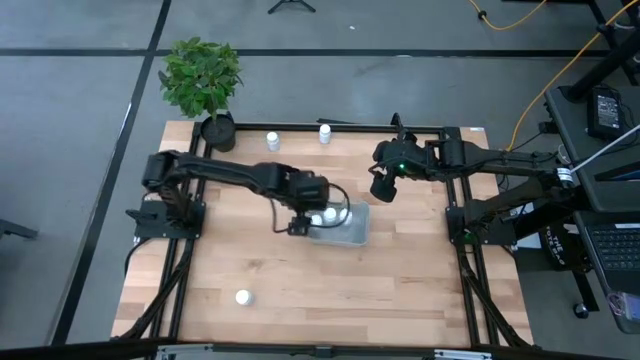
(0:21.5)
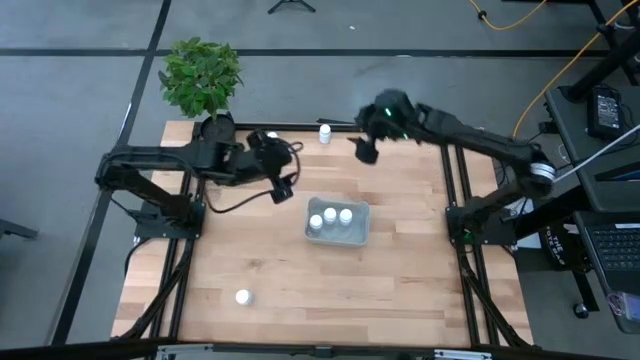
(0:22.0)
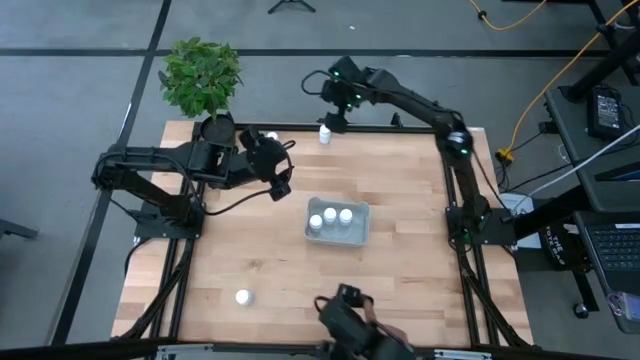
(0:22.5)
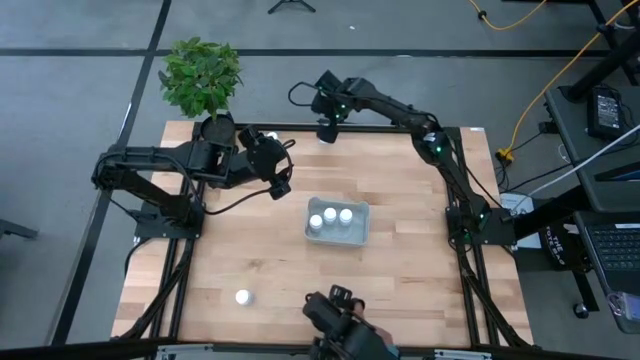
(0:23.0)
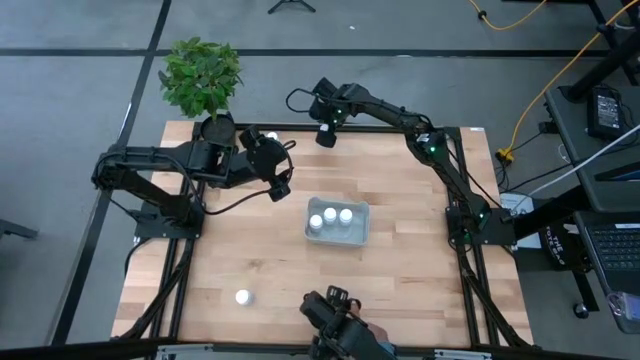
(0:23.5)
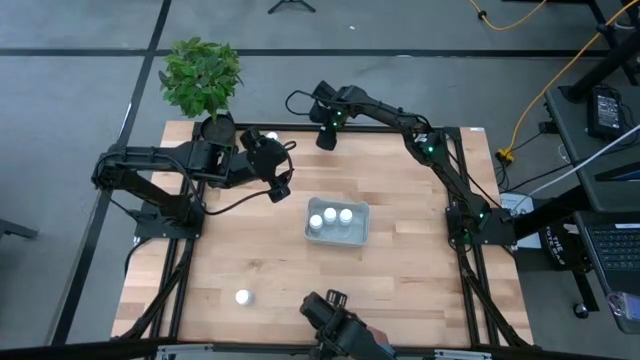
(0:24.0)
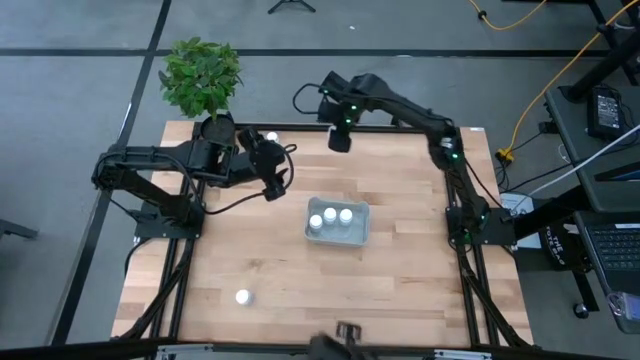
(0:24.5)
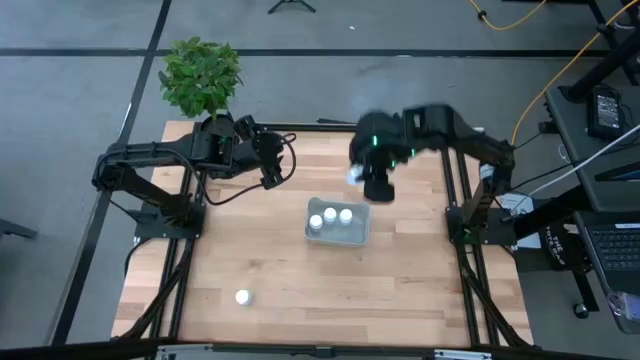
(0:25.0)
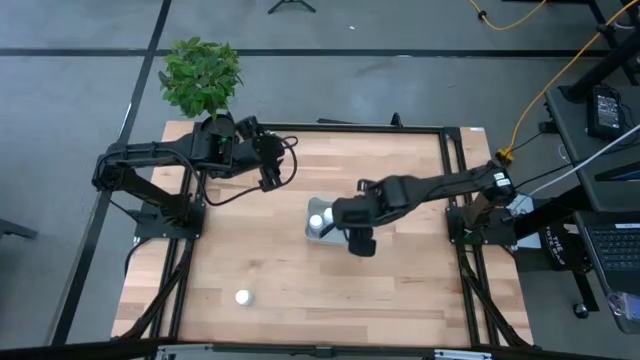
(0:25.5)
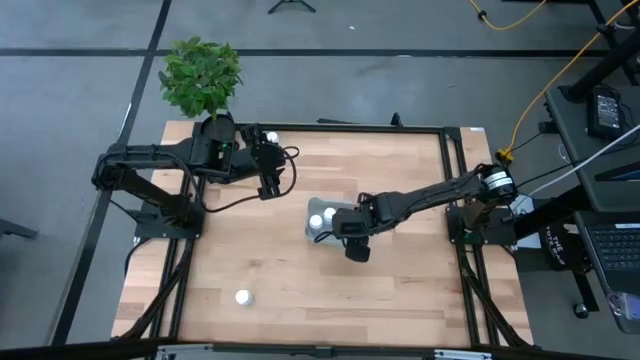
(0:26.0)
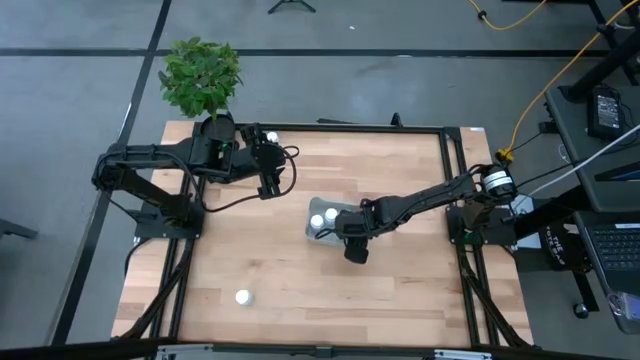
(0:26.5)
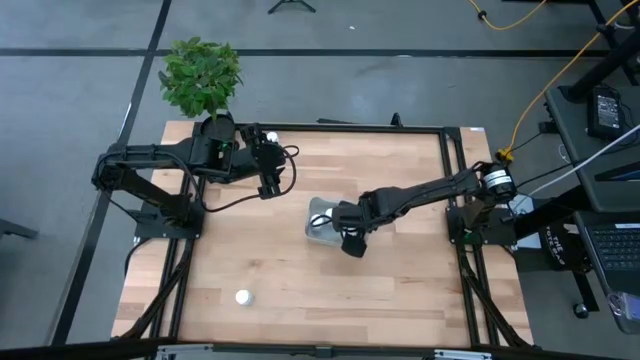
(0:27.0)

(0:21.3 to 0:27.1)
Task: Pick and place pill bottles into a basket
Put the top right white pill bottle into the gray bin

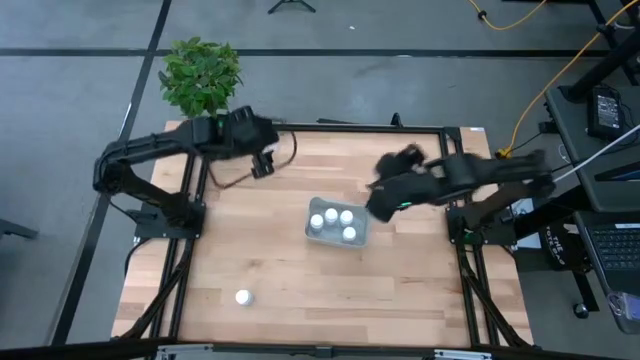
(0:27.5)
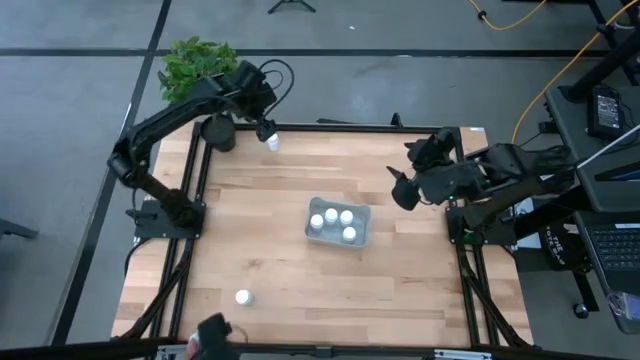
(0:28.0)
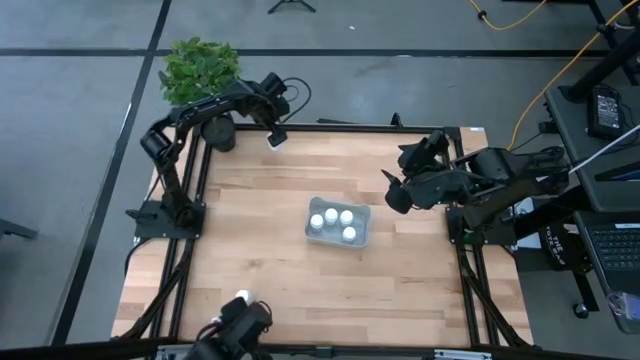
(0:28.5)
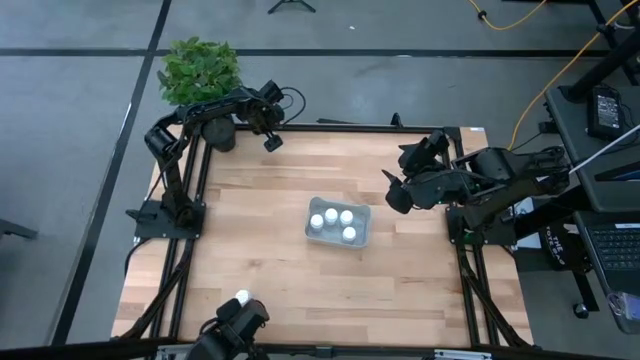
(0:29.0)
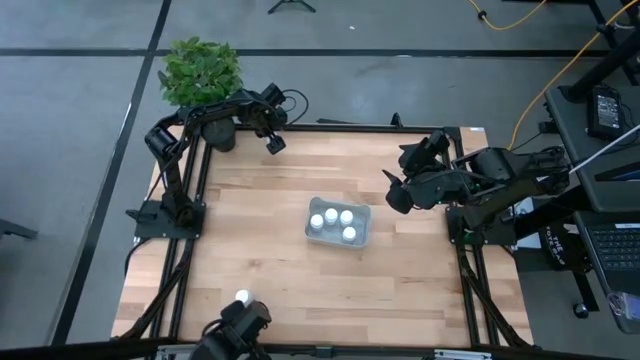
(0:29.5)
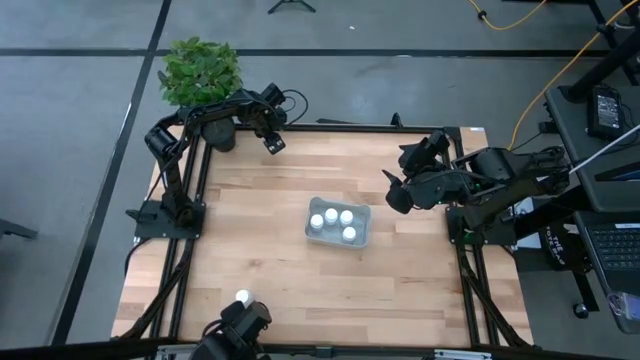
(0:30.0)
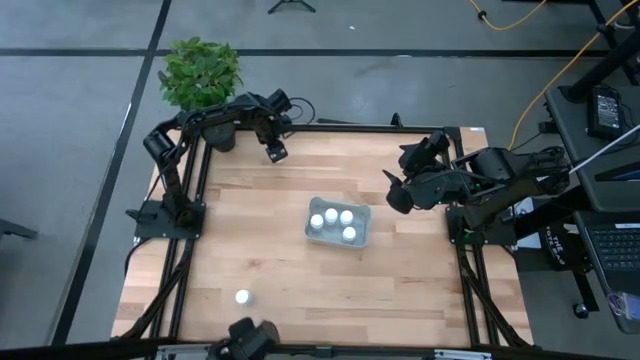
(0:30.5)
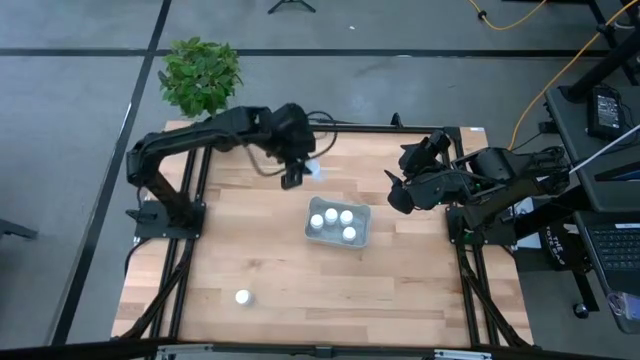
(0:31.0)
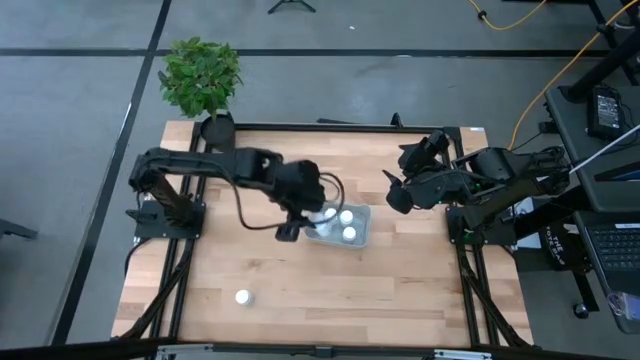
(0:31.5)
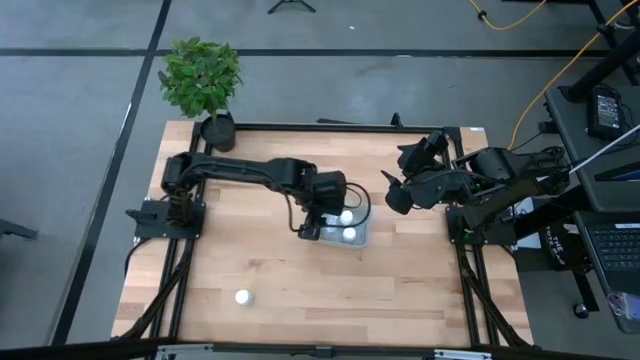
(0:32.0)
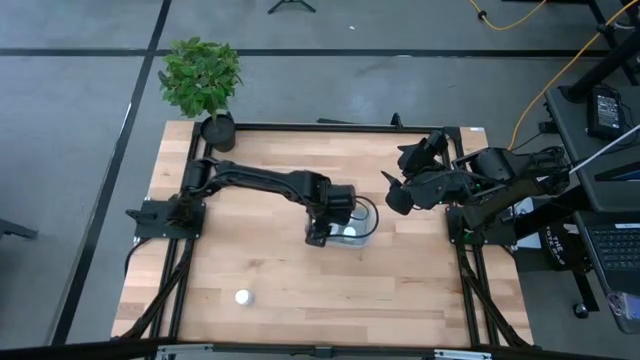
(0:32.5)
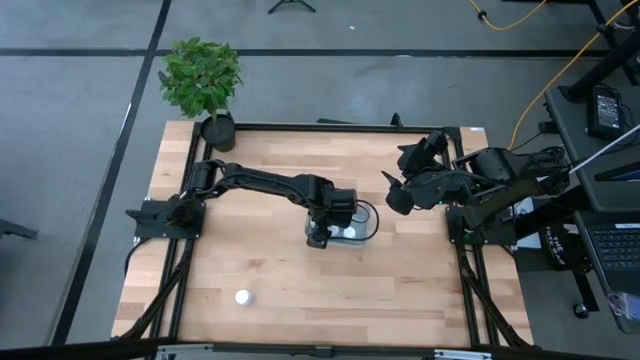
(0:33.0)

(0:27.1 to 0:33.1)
Put the top white pill bottle into the gray bin

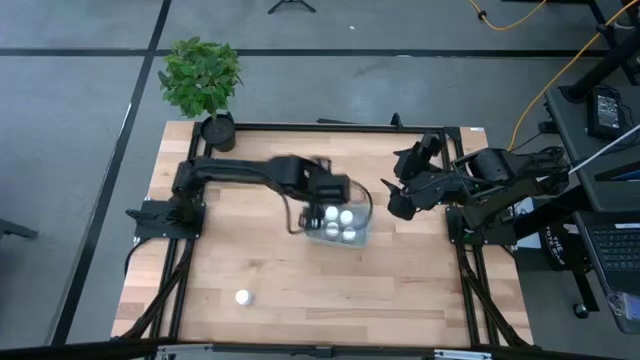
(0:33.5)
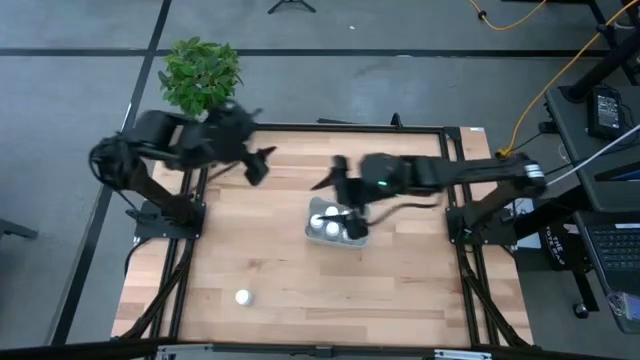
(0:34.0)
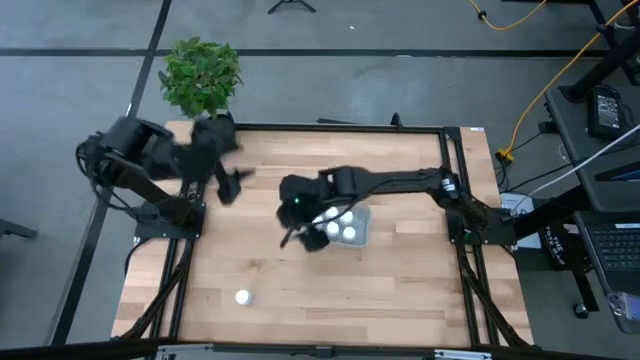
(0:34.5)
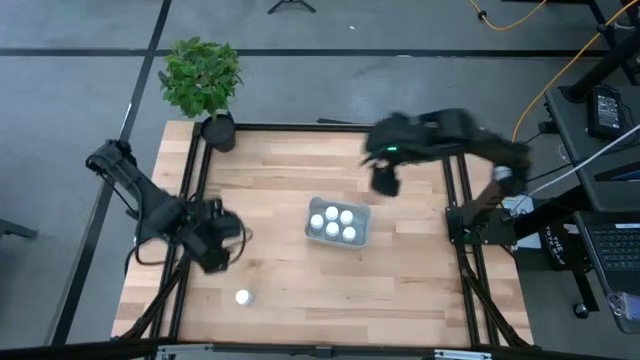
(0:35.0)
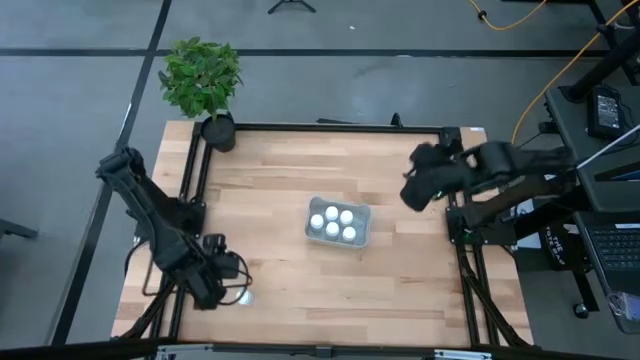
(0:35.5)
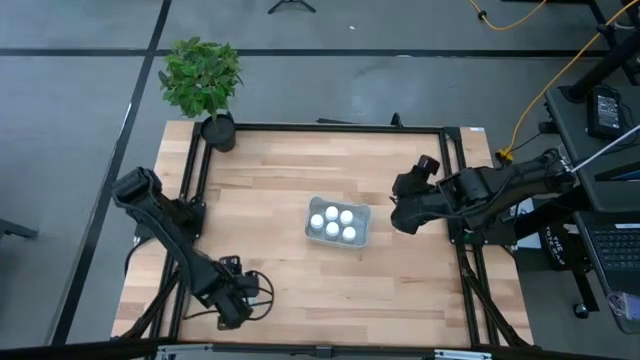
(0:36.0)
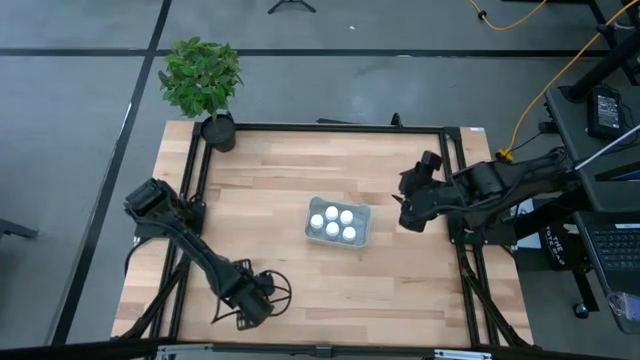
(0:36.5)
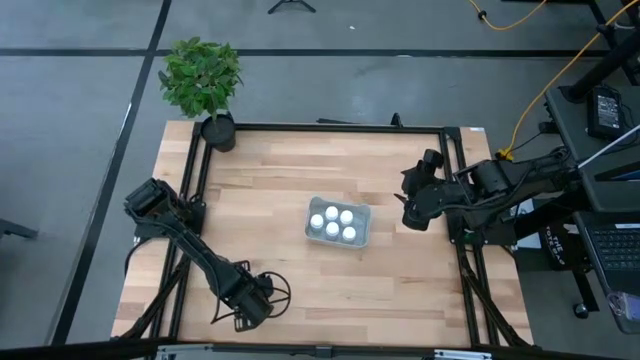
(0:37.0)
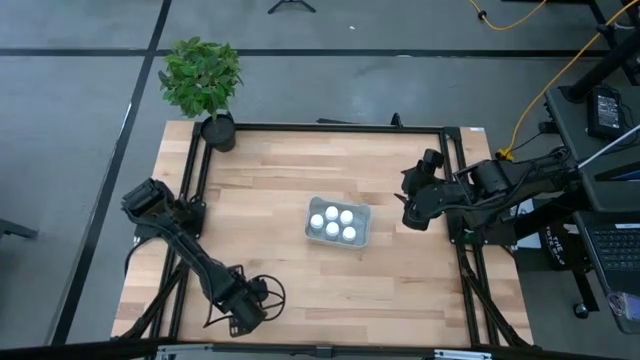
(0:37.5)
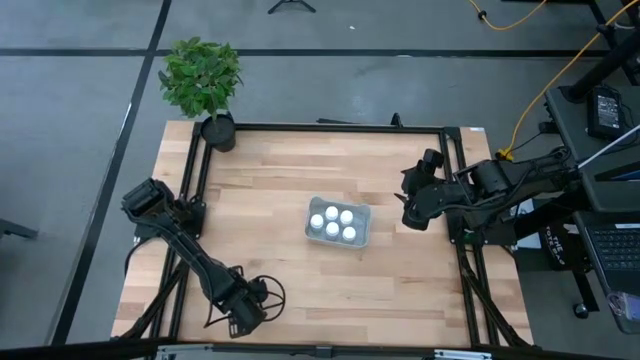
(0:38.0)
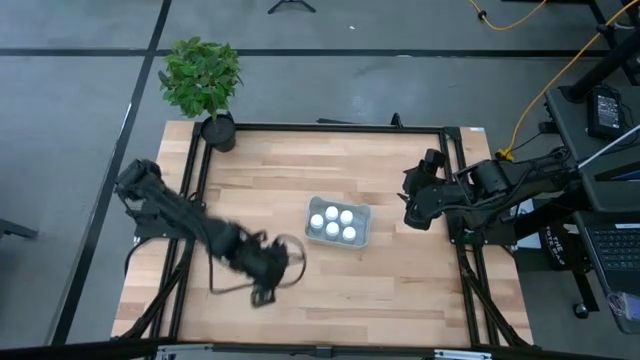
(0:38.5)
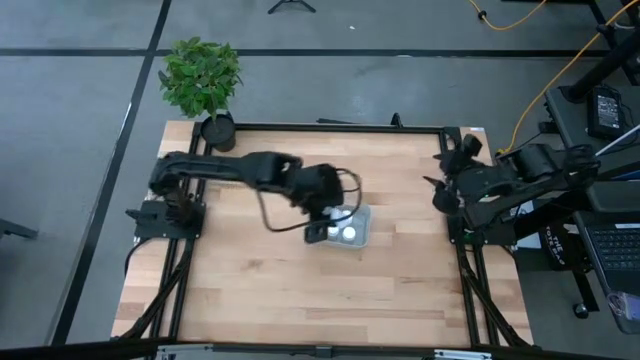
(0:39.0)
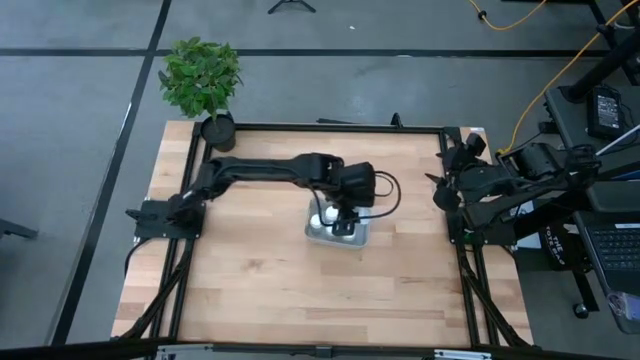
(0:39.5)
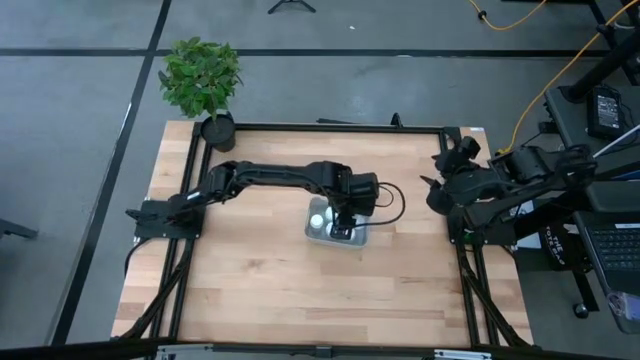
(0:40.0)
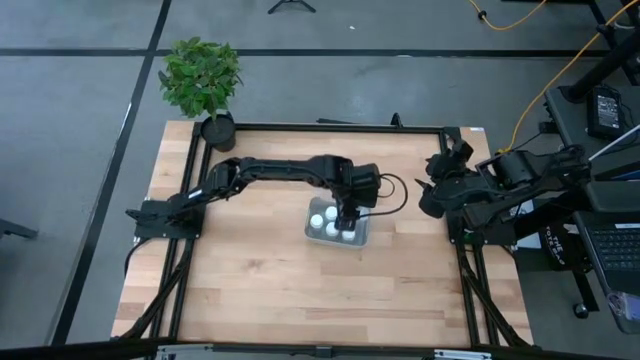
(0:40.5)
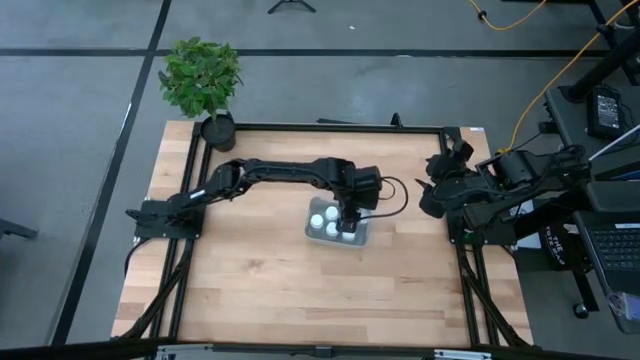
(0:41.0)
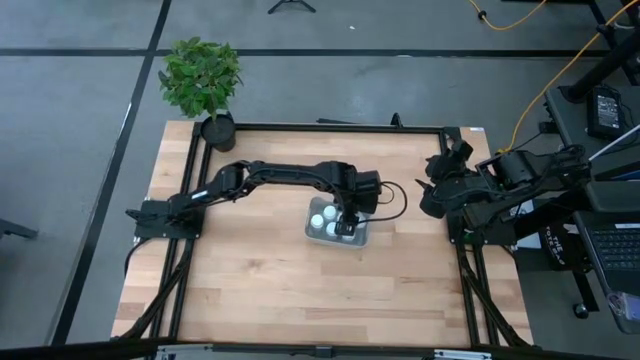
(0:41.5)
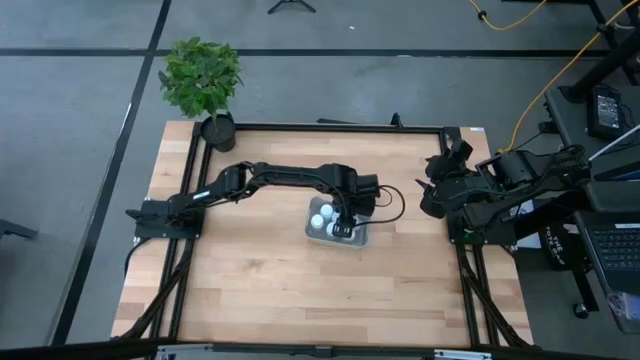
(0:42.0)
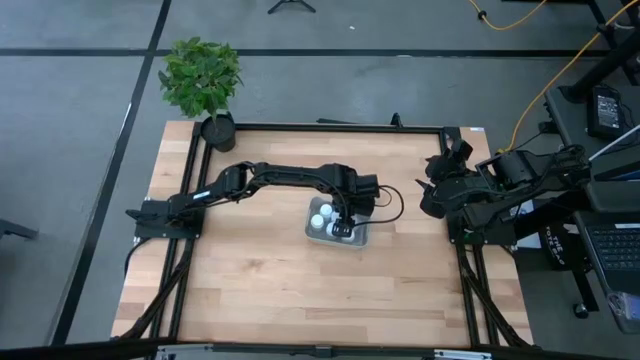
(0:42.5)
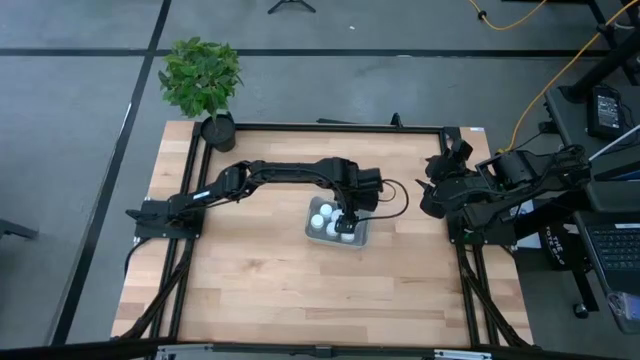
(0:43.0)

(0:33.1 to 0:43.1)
Put the white pill bottle into the gray bin
